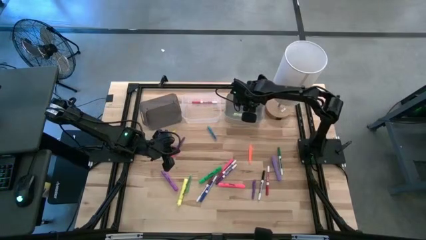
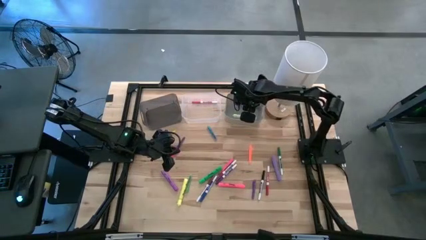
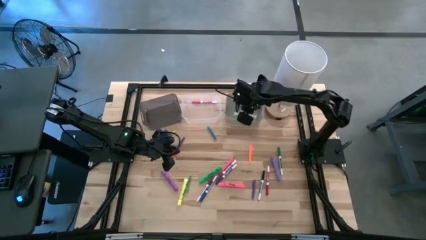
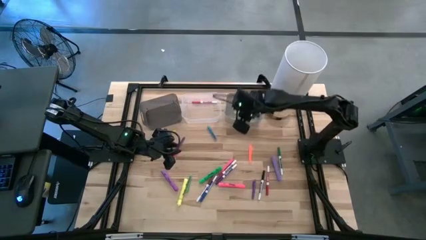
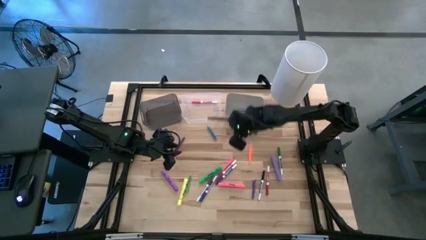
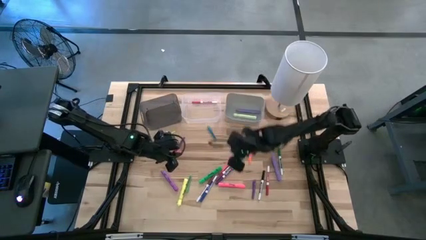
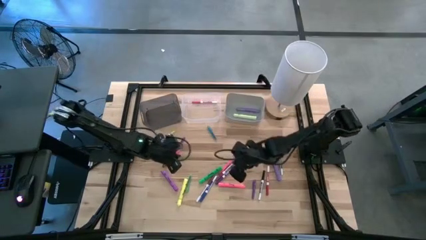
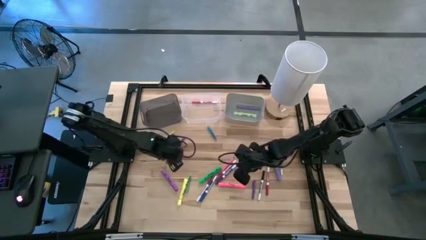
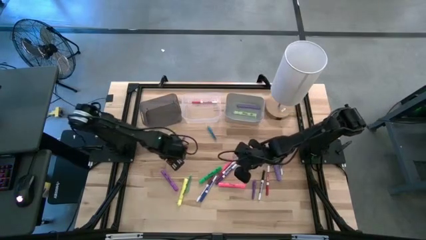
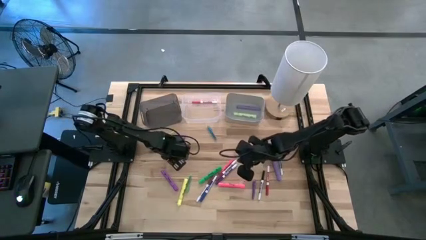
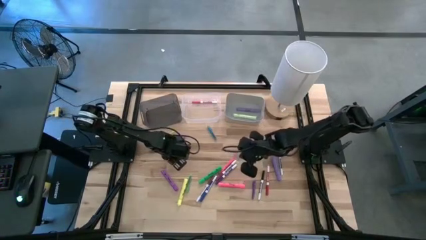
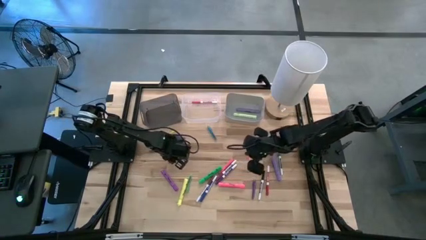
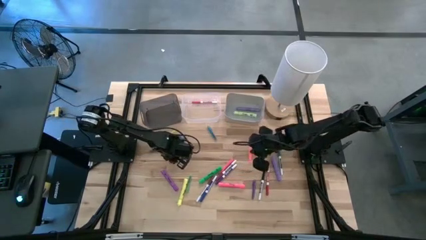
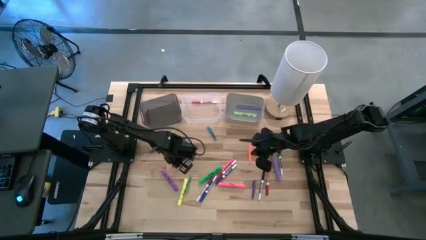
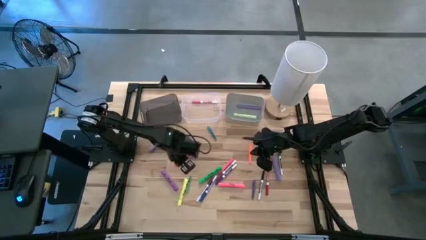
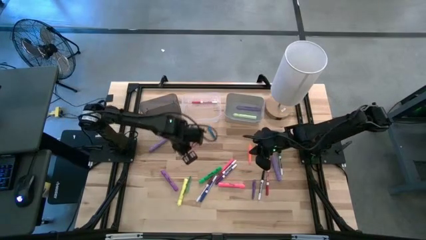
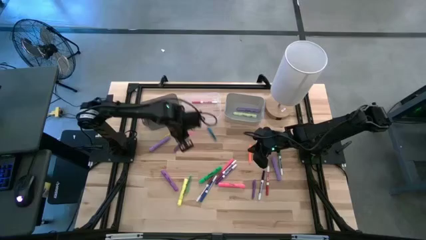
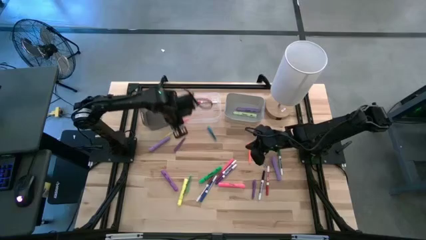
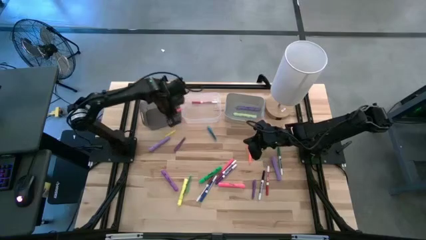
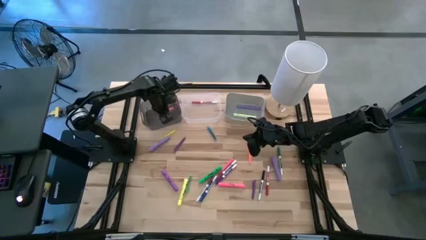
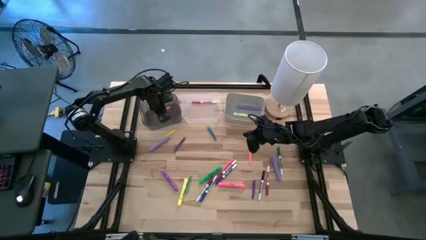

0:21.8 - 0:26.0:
Task: Pick & Place Markers
Put the pink pen into the black bin

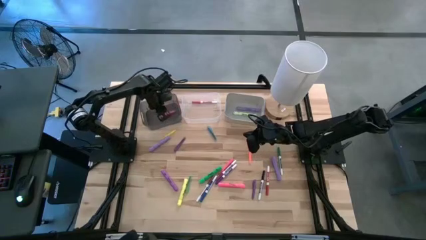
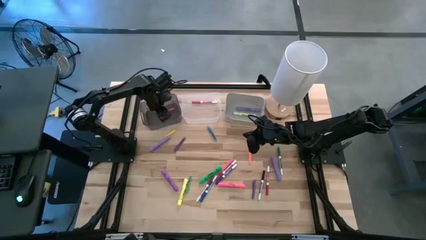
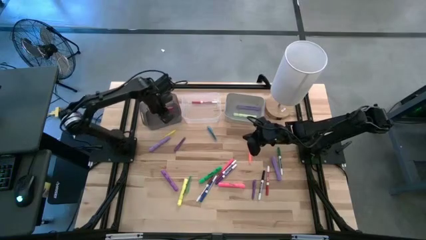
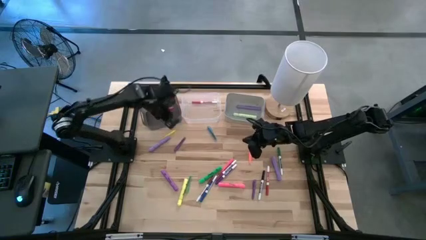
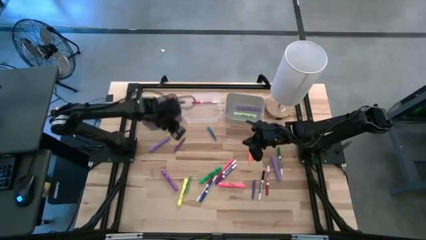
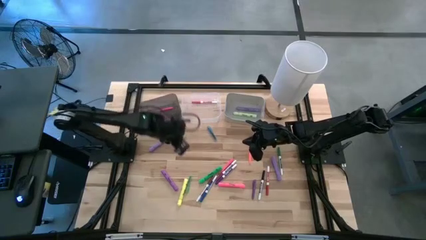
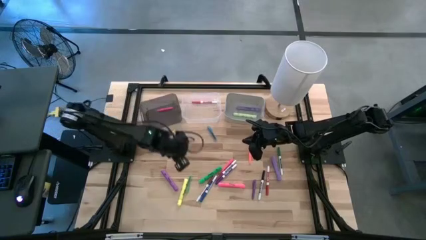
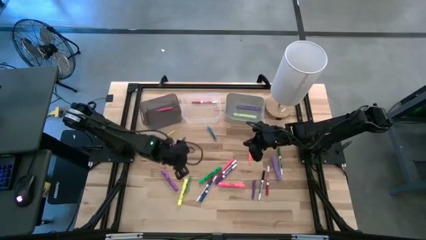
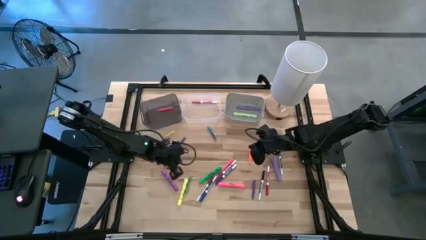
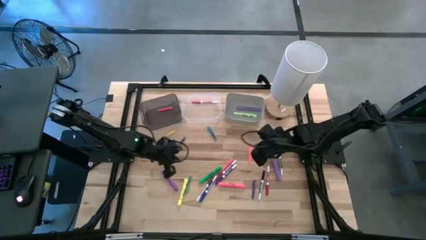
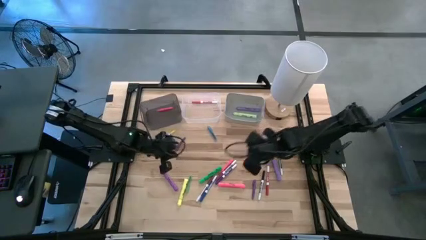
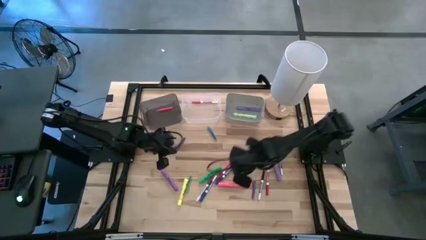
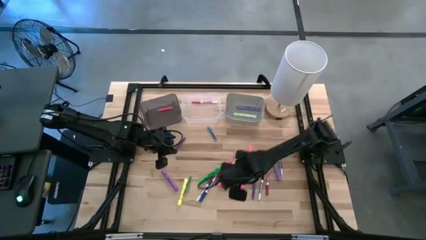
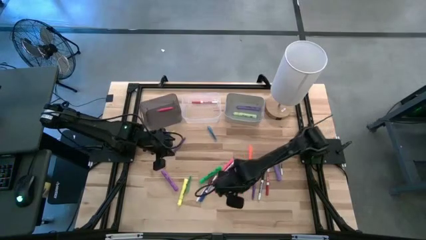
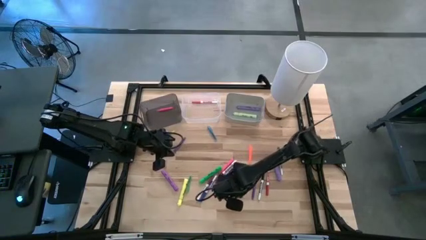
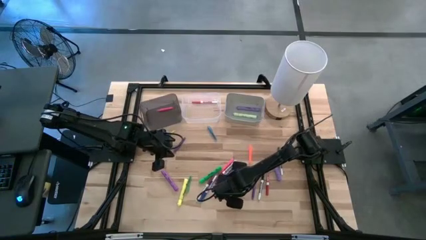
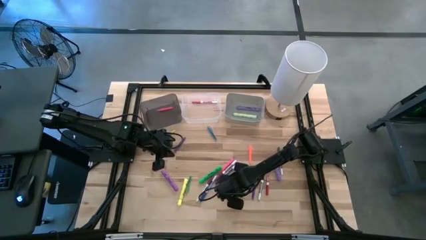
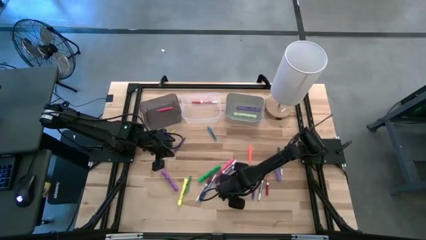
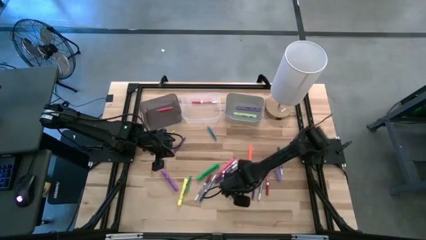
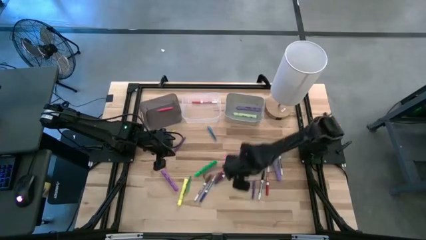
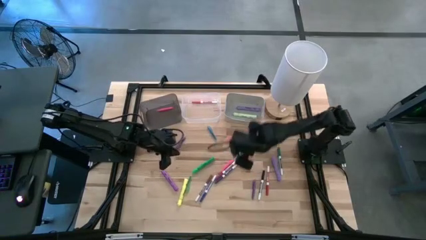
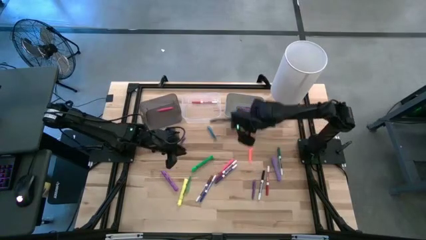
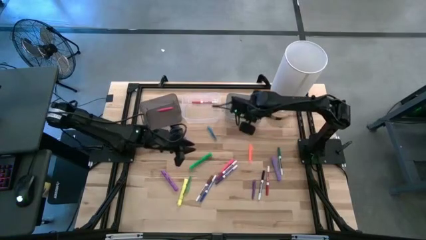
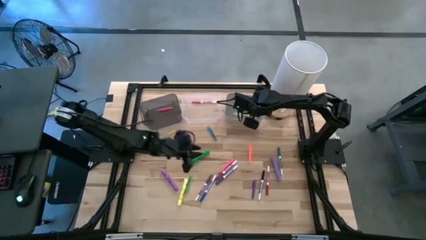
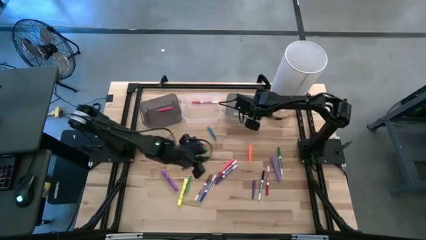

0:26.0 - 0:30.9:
Put the pink highlighter pen into the gray bin

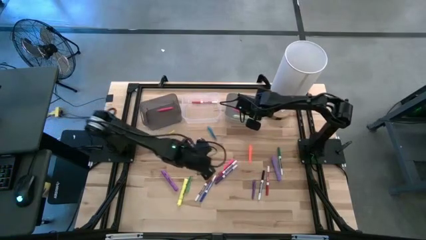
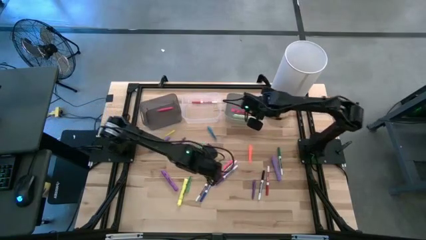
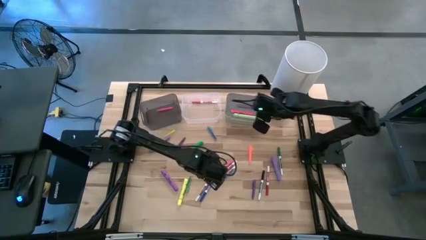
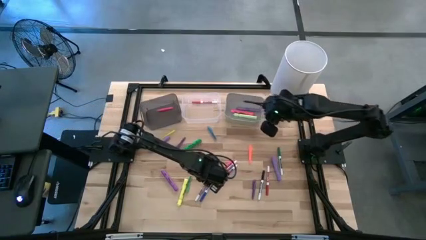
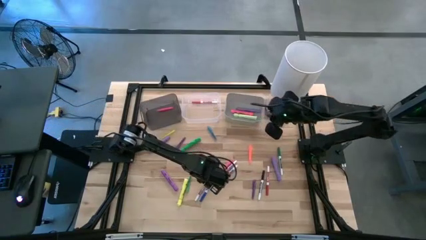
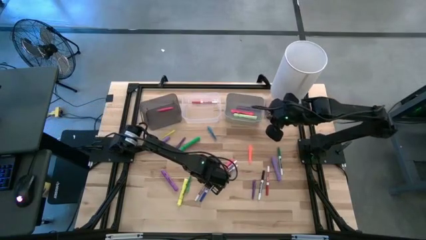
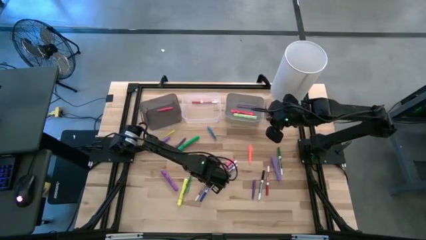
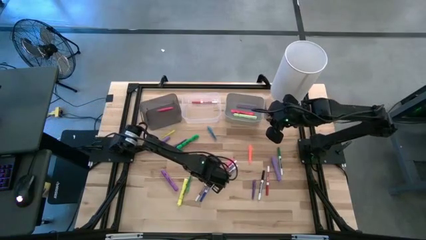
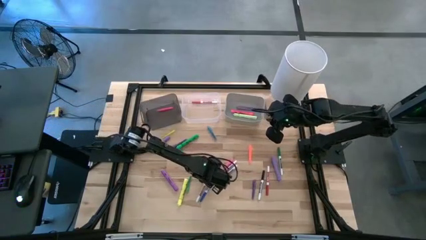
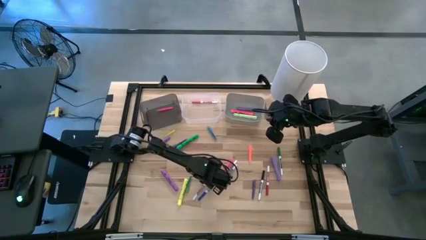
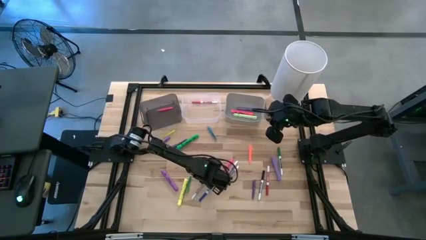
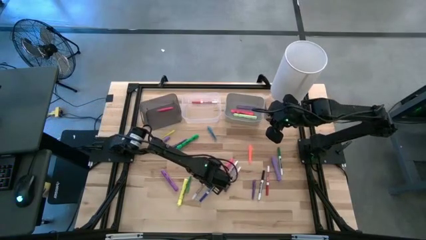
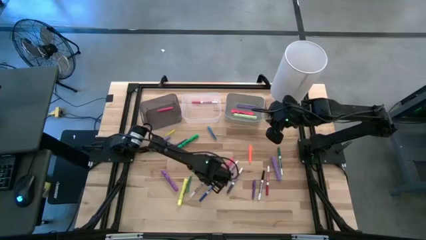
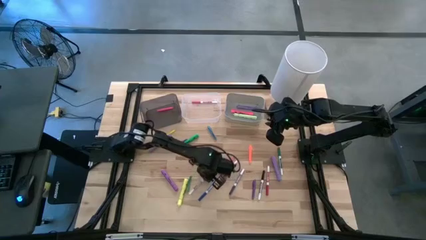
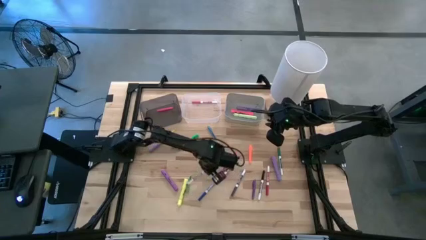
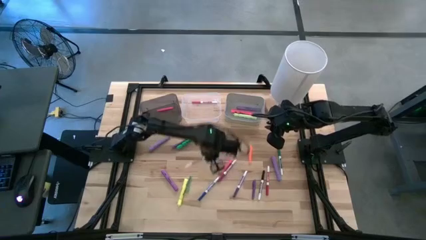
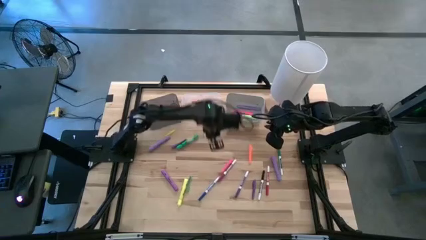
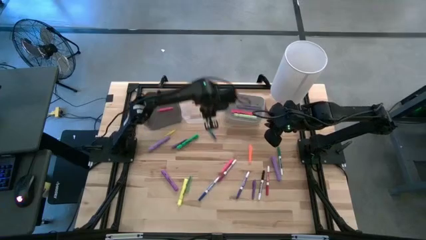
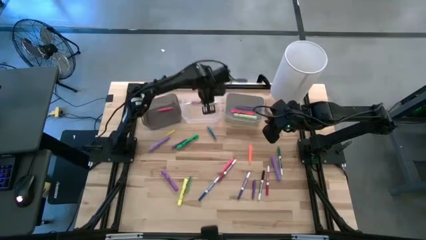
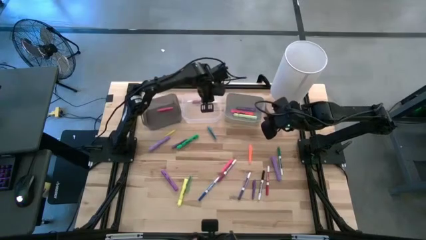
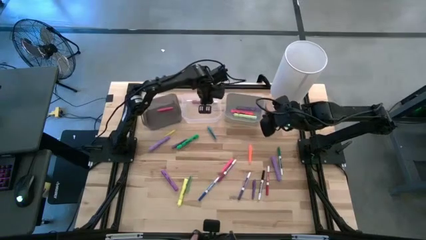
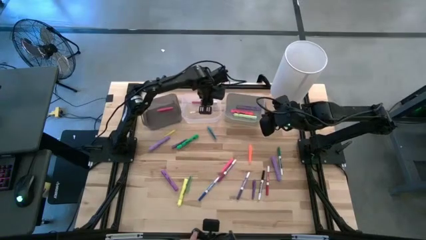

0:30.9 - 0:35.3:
Put the brown marker pen into the transparent bin

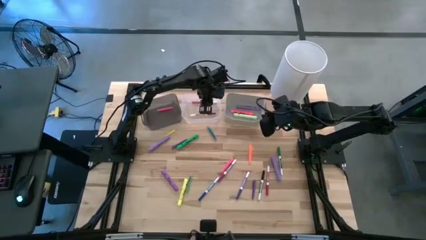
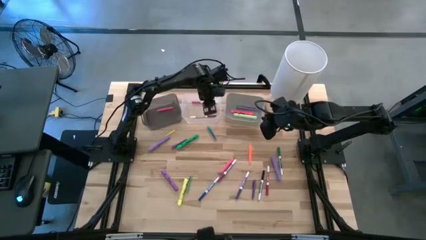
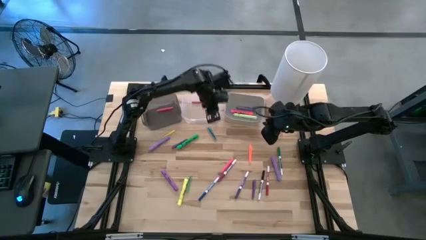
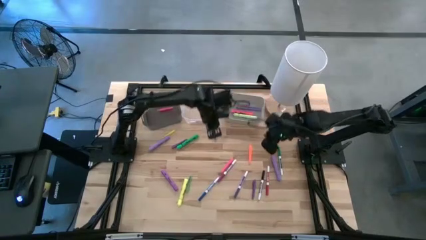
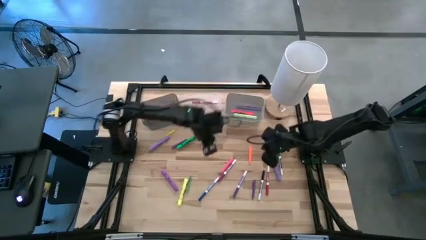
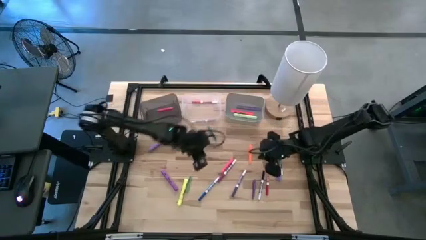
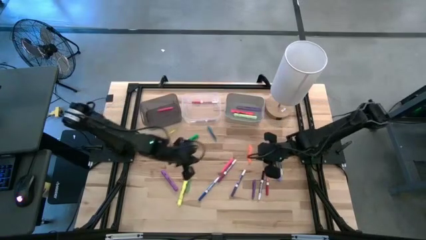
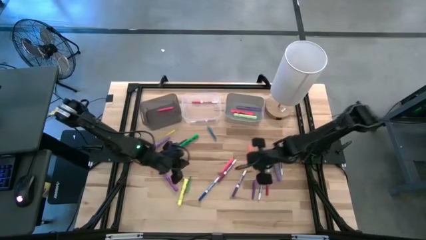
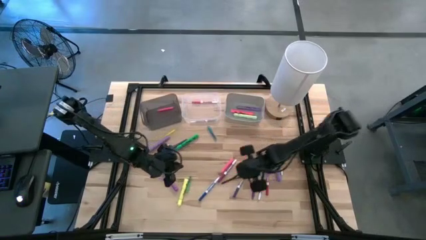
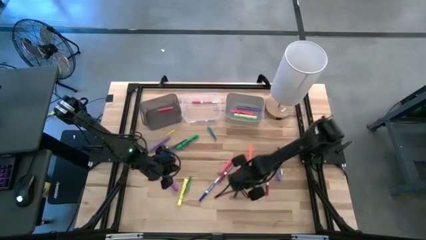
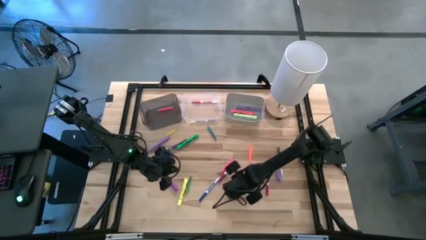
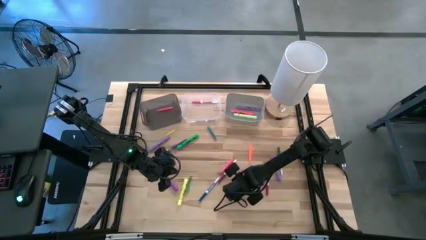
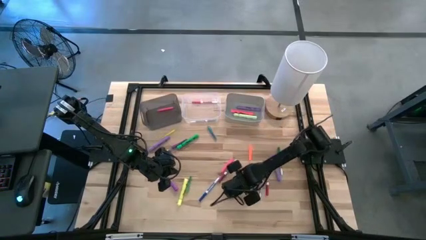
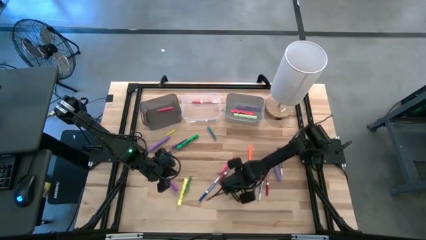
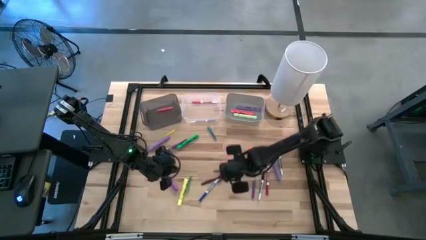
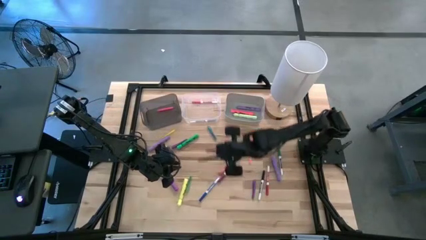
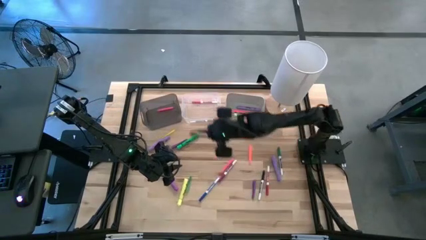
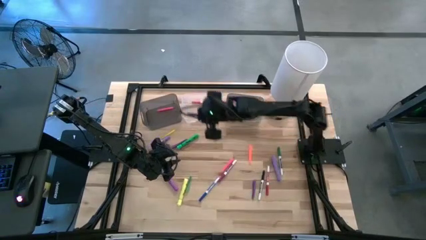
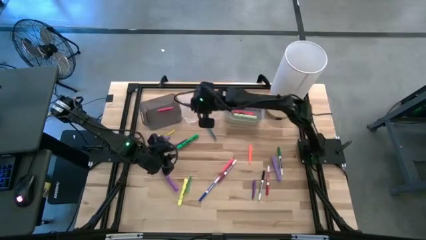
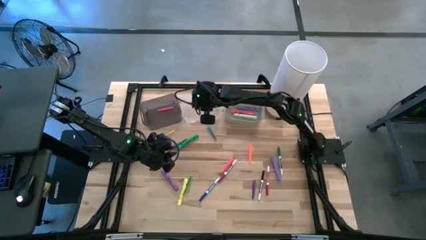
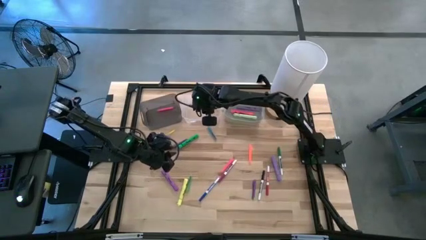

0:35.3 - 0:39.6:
Put the blue marker pen into the transparent bin
